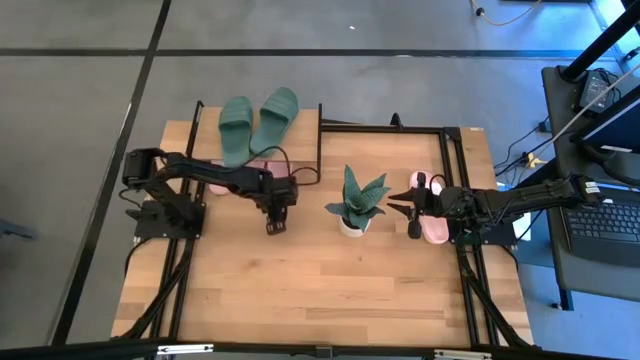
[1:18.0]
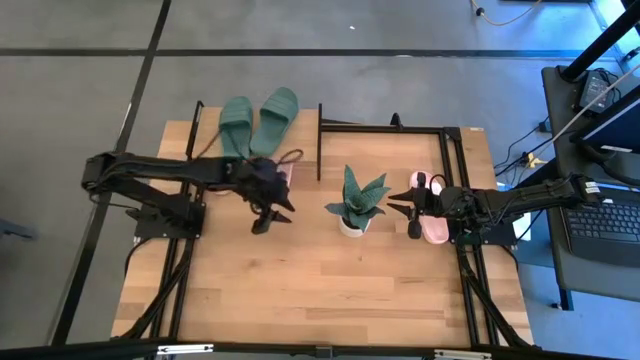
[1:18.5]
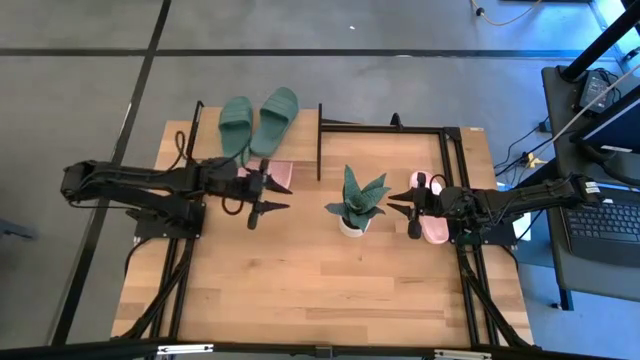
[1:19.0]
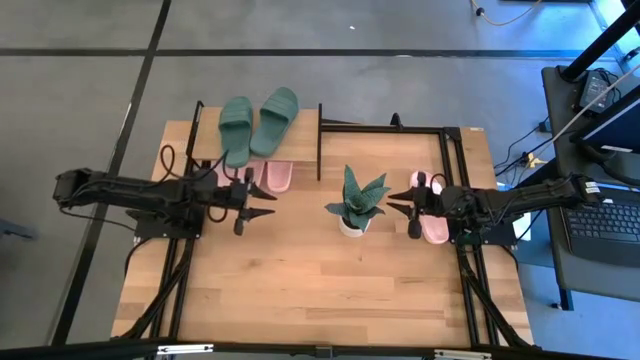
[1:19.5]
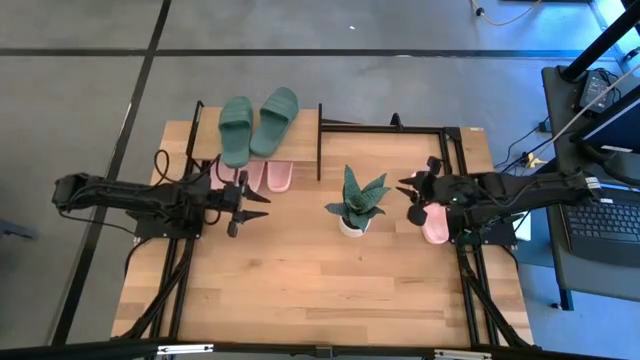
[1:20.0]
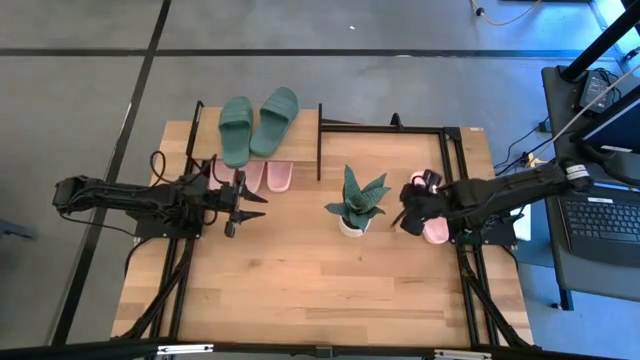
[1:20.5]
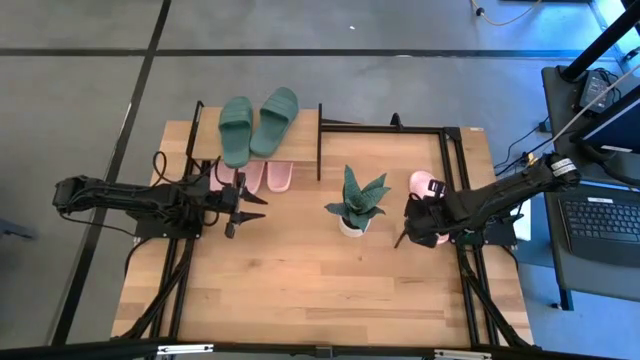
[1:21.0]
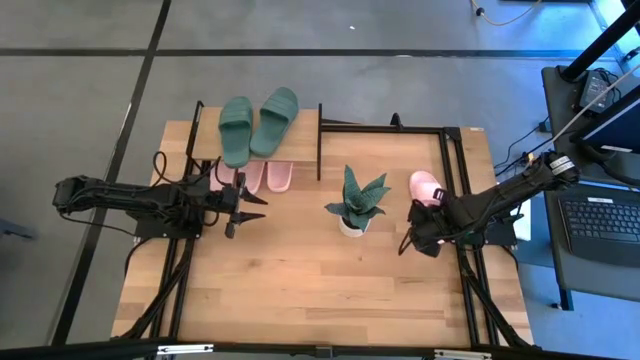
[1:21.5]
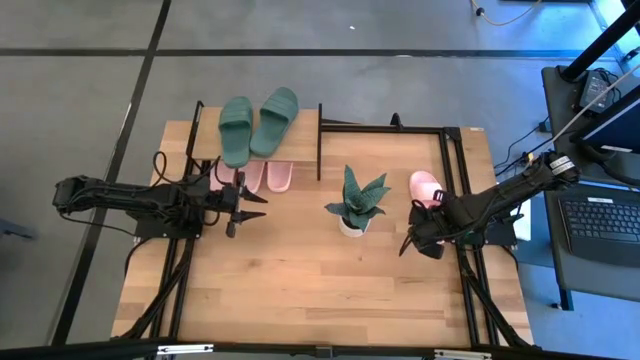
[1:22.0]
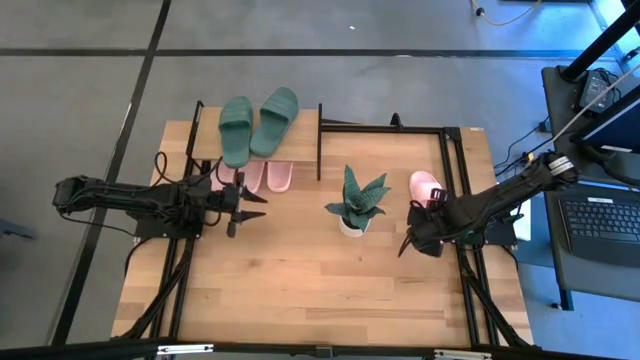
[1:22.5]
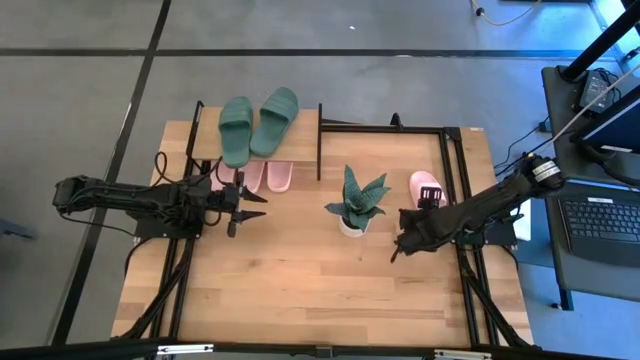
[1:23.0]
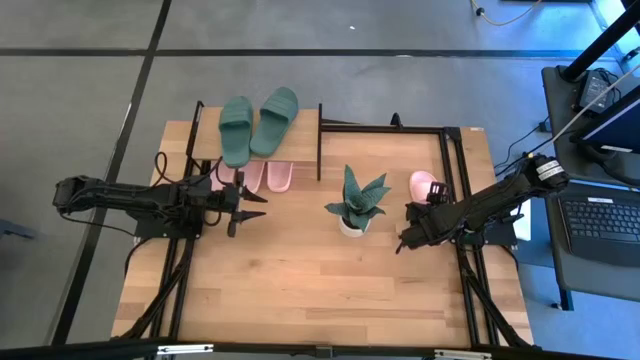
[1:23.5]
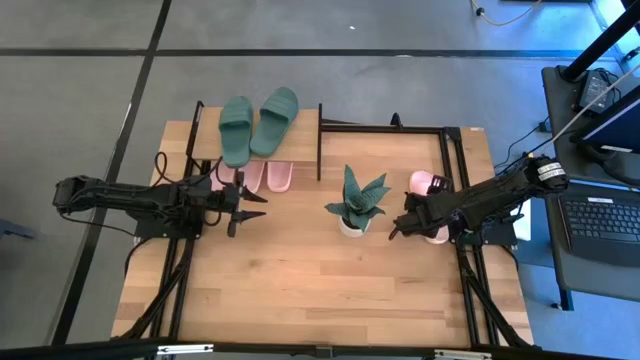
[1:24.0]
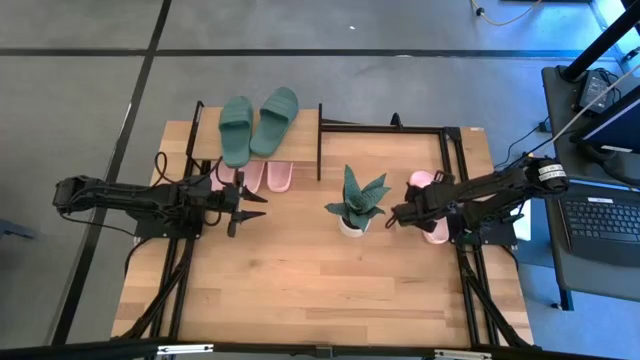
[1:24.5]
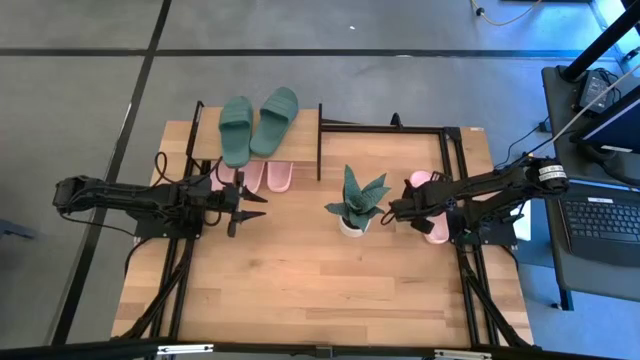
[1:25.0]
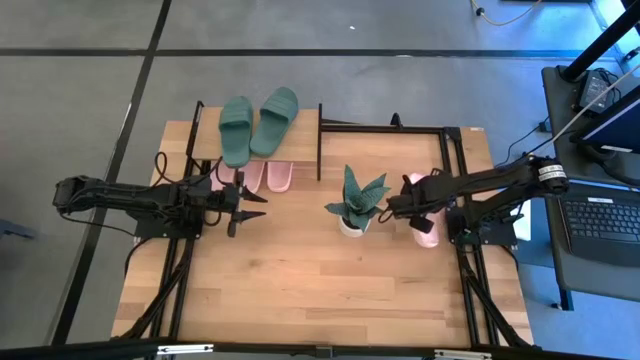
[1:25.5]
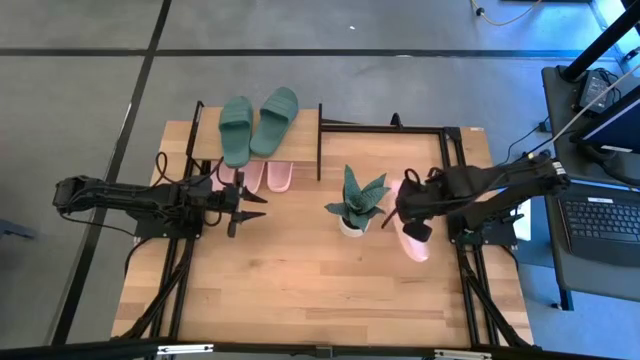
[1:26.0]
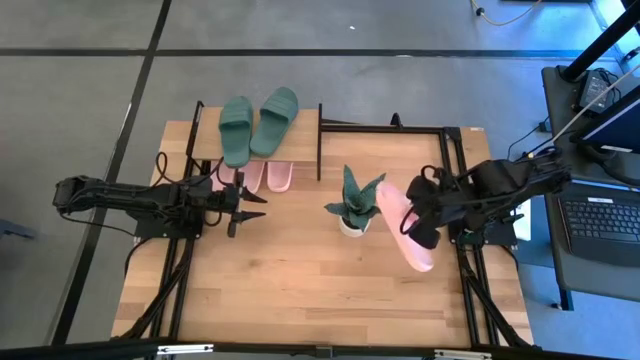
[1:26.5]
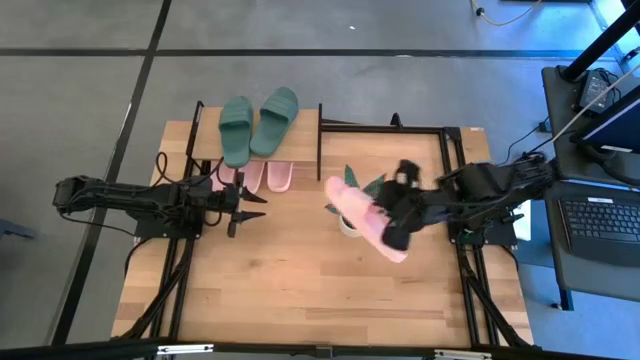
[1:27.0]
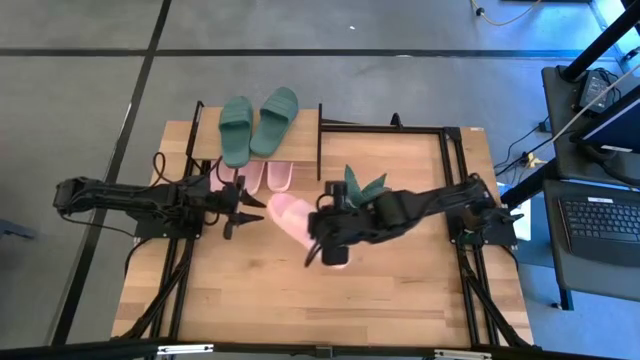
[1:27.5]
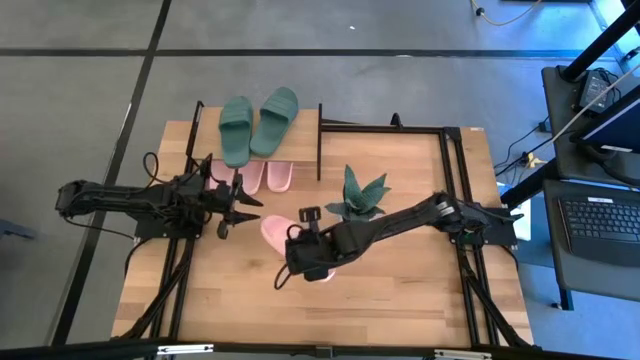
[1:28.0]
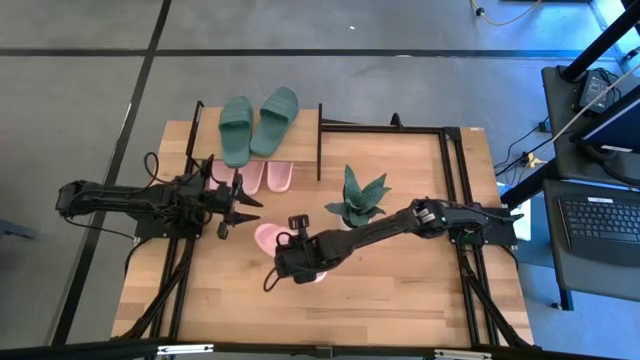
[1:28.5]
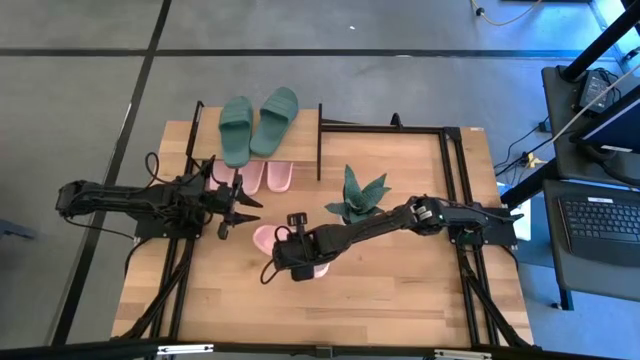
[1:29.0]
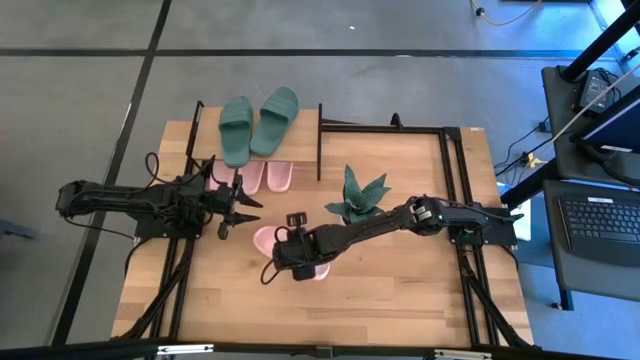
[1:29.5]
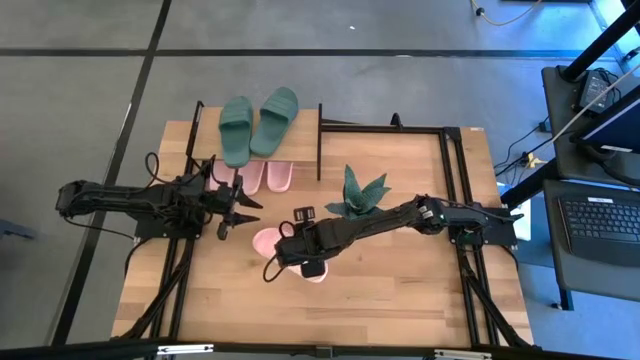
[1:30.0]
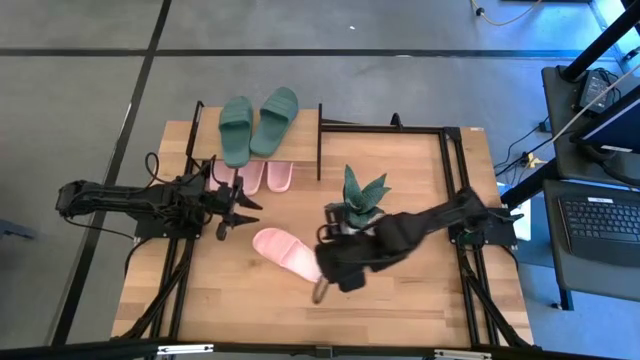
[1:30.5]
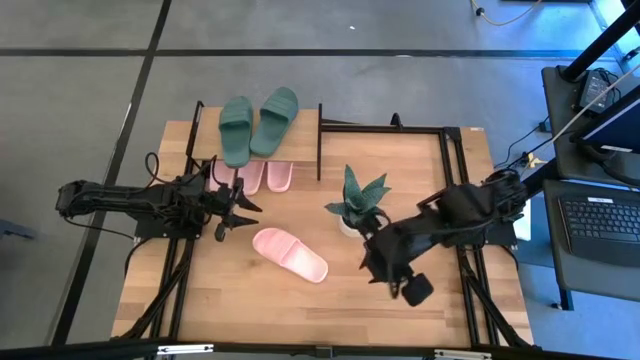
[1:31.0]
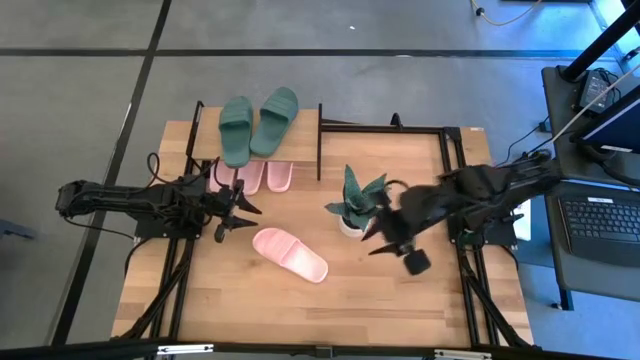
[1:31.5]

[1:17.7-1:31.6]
Task: Pick and place slides into the shelf
Put the pink slipper under the shelf

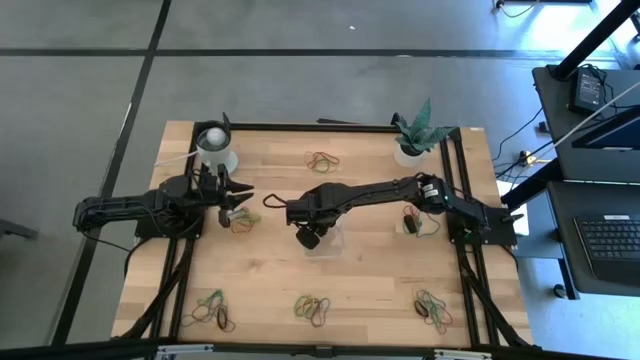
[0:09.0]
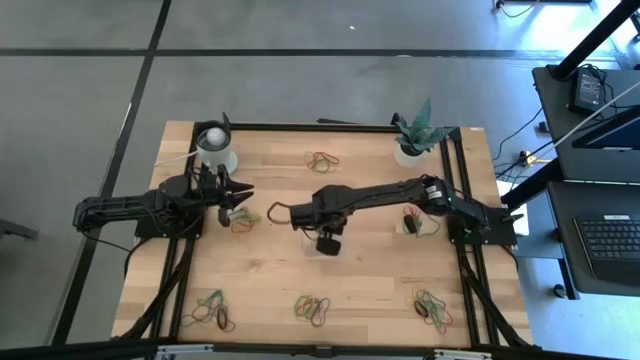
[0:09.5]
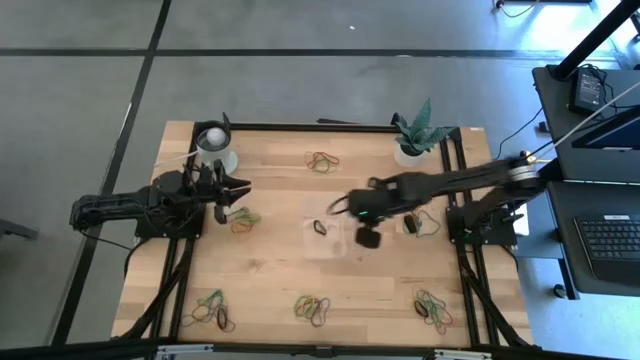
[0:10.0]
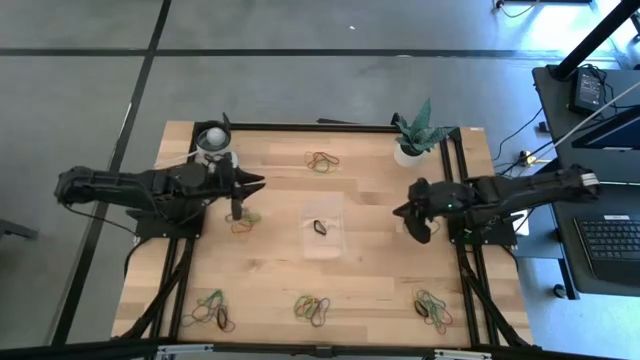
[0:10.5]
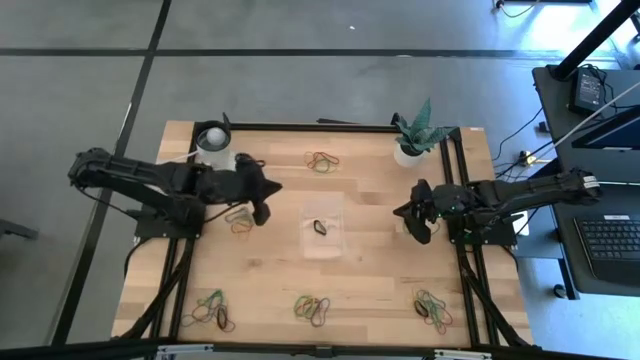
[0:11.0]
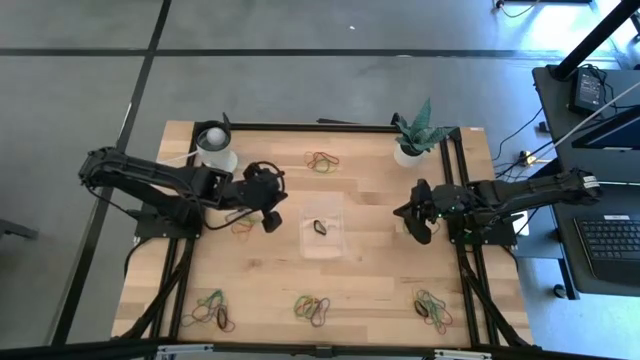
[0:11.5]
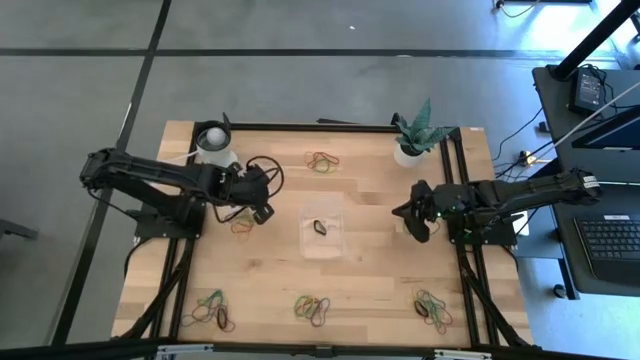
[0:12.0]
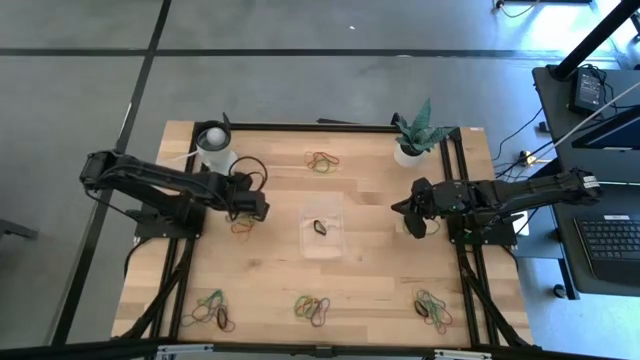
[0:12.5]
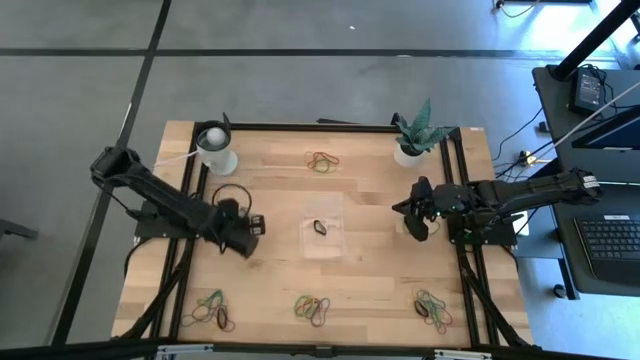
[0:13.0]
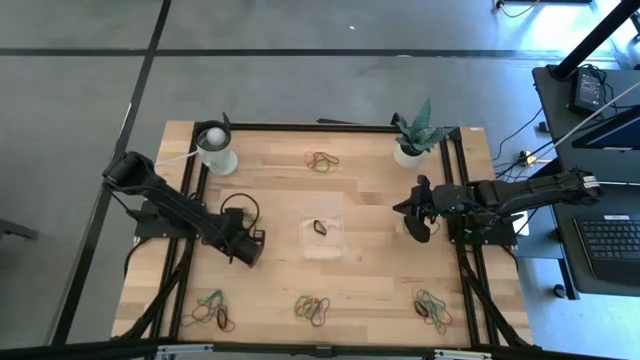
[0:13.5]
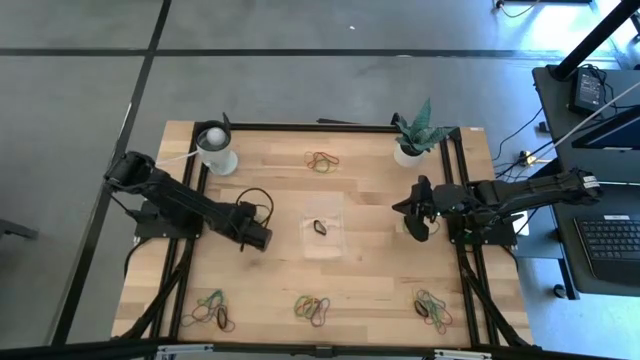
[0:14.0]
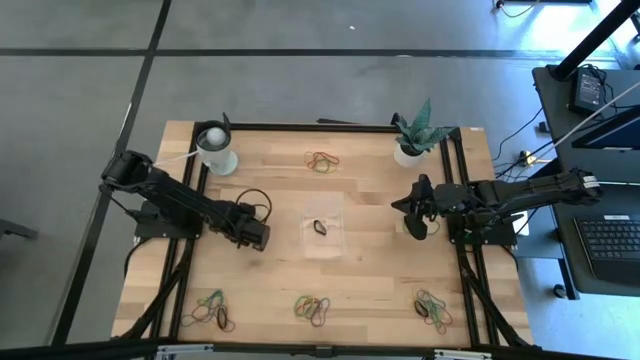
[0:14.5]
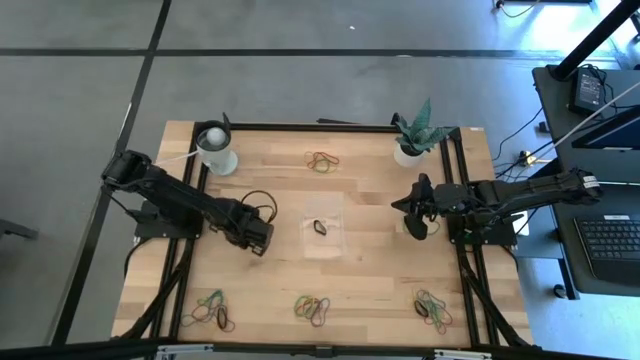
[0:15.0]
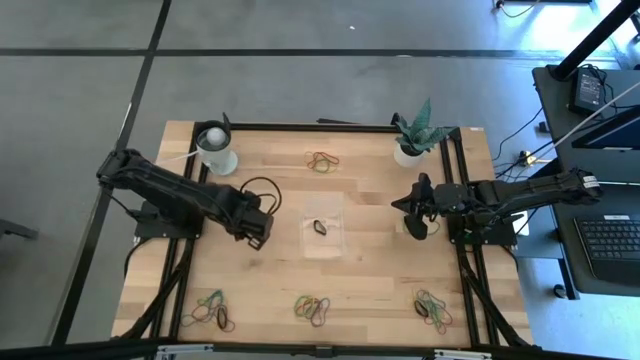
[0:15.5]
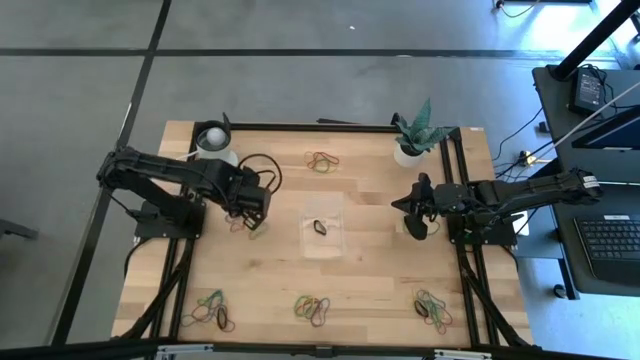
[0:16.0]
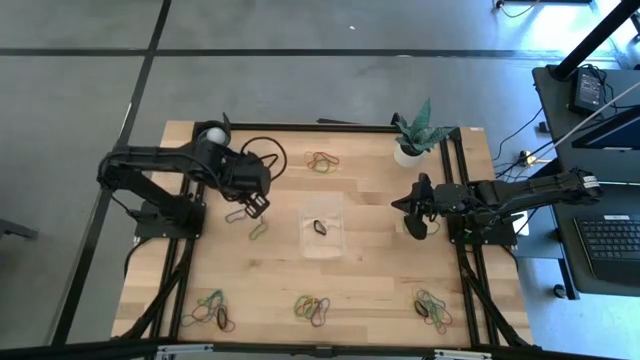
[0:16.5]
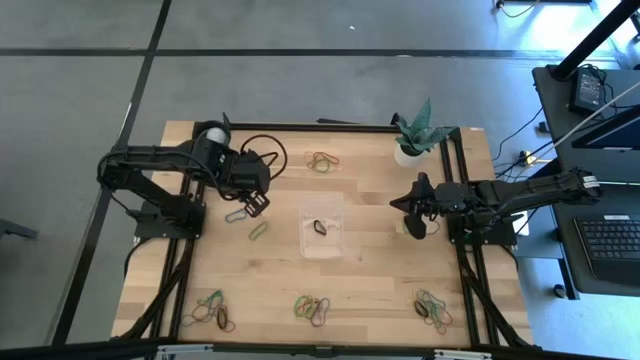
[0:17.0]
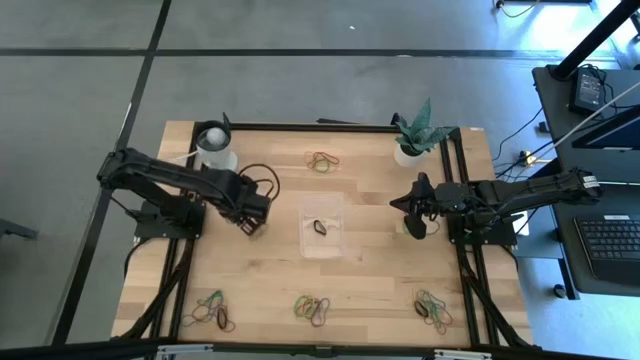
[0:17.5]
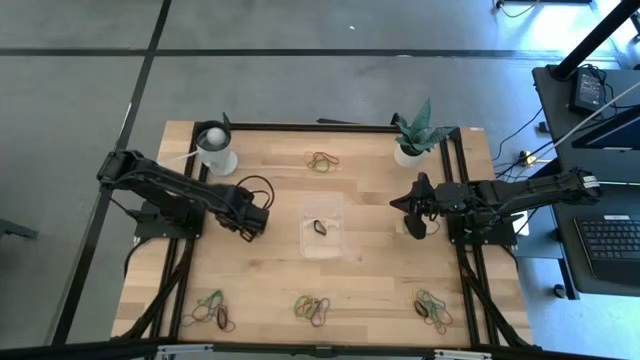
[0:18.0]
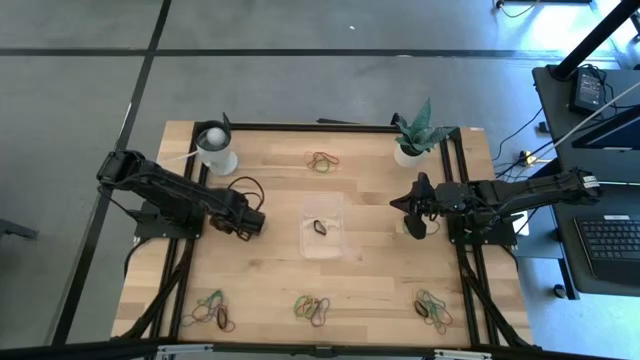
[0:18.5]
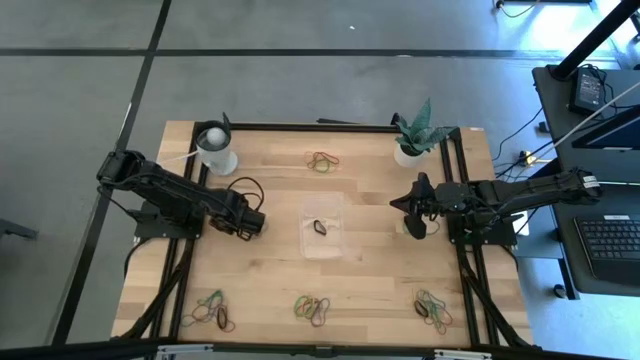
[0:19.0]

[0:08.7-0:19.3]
Task: Pick and place rubber bands into bin
Put the yellow rubber band into the transparent bin
